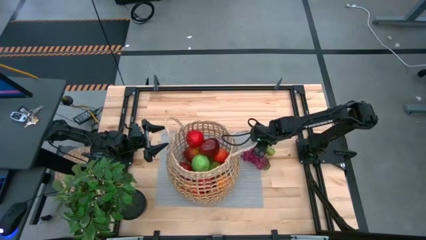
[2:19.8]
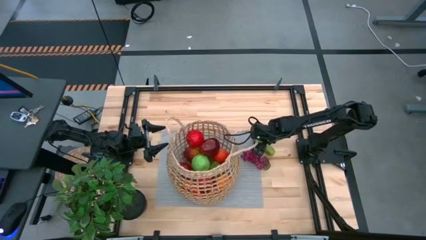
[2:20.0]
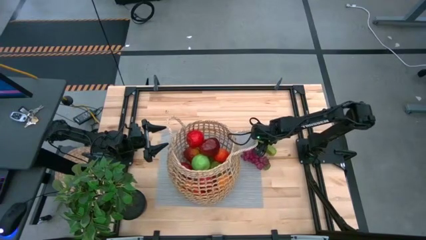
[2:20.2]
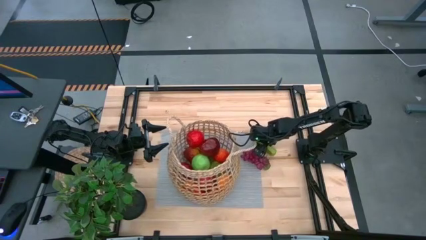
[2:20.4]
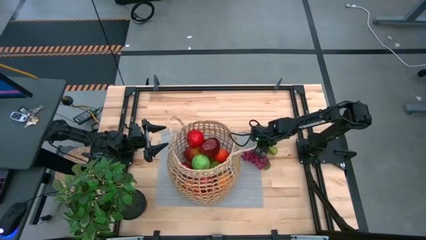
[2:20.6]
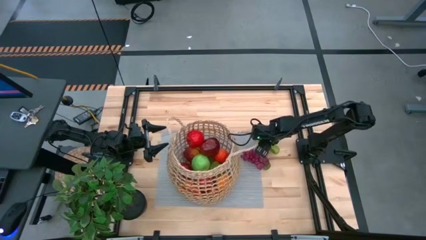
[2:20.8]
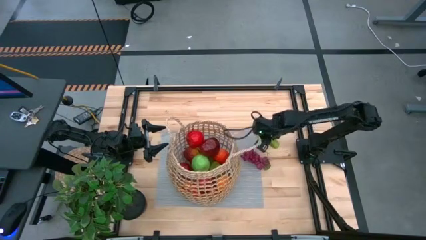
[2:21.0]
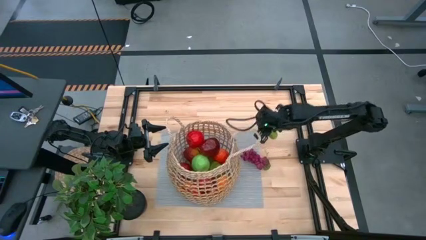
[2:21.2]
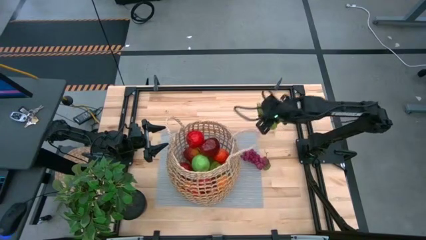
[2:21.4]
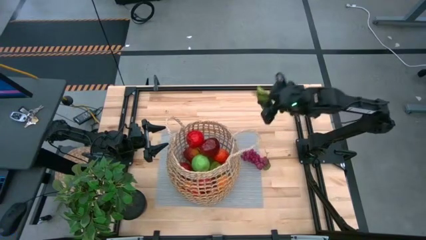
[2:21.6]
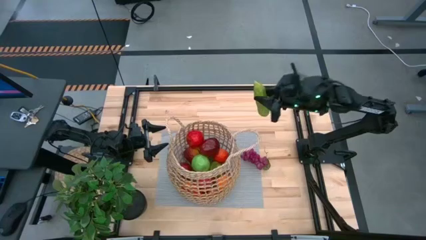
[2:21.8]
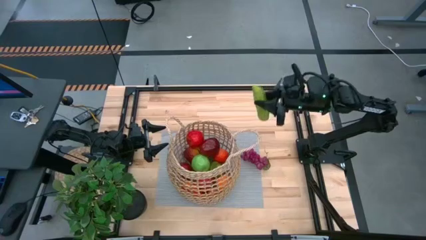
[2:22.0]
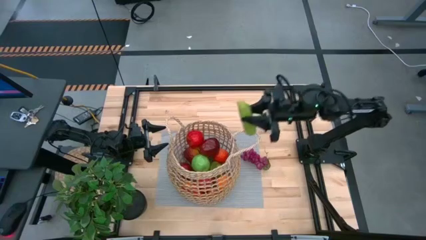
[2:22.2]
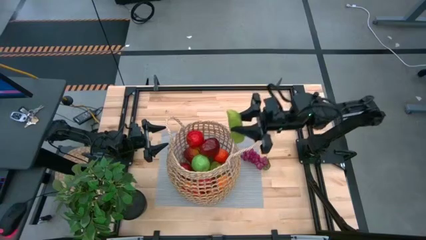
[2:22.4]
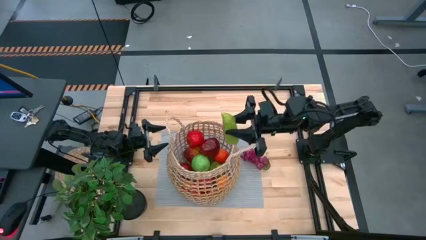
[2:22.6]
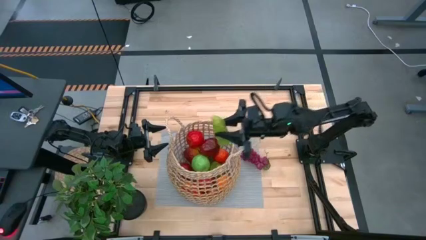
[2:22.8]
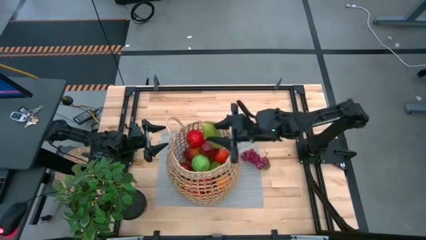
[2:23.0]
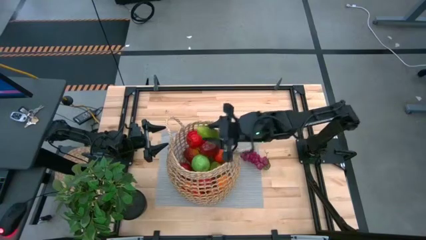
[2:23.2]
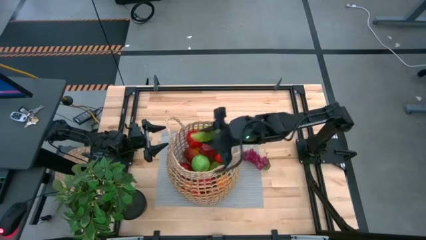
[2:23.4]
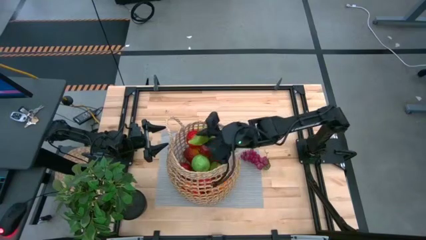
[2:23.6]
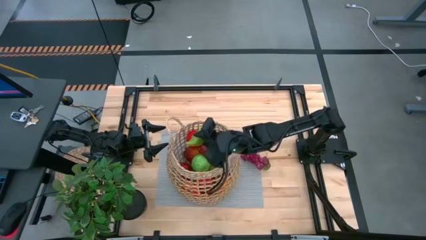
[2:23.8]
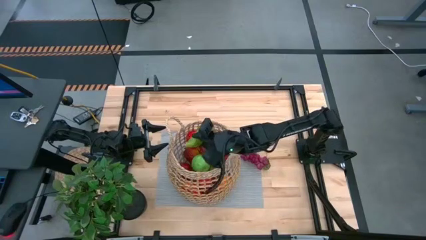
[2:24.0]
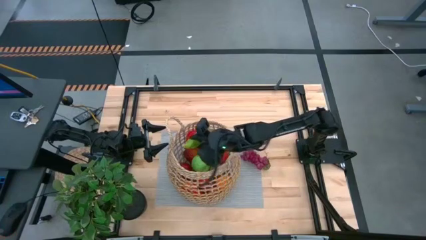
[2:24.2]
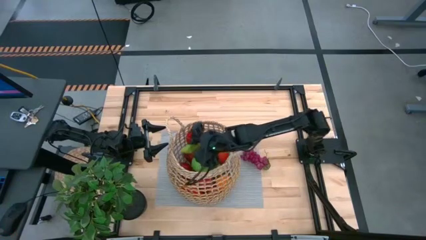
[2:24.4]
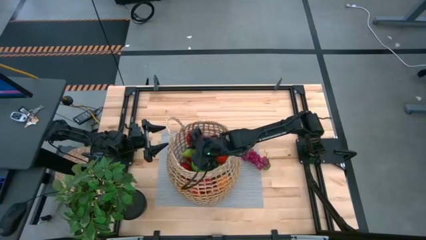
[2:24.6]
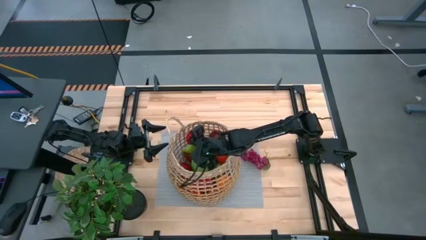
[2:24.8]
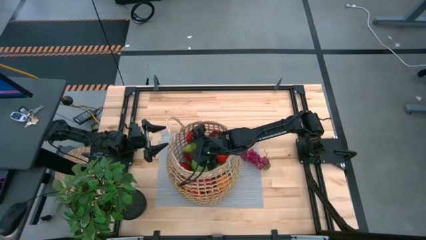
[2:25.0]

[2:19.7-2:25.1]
Task: Build produce basket
Put the green cucumber into the brown basket

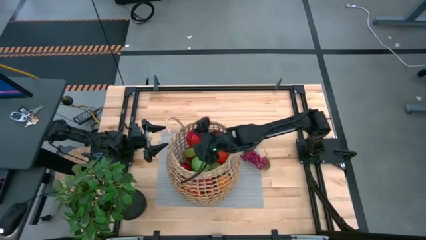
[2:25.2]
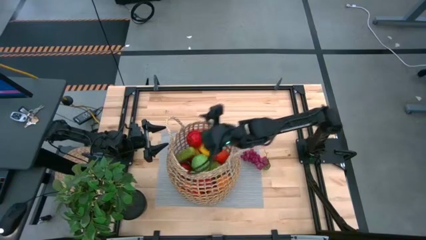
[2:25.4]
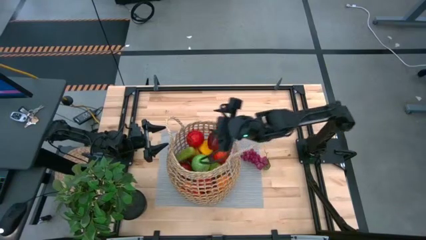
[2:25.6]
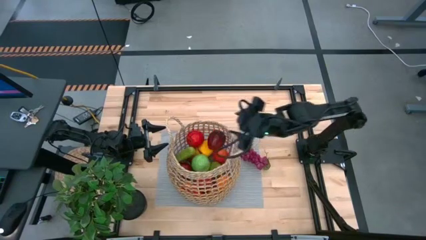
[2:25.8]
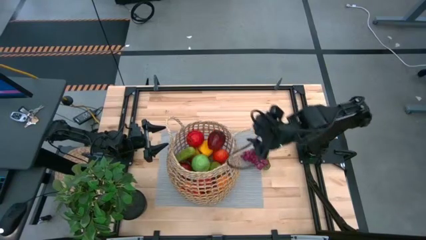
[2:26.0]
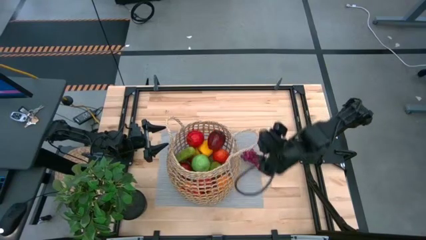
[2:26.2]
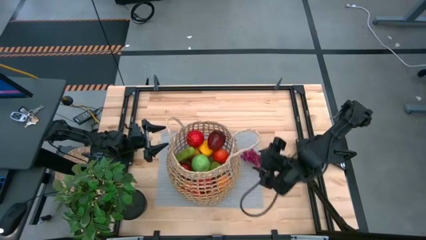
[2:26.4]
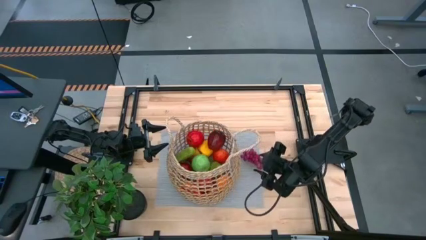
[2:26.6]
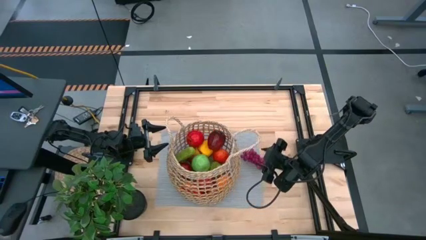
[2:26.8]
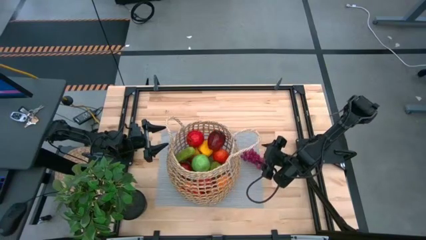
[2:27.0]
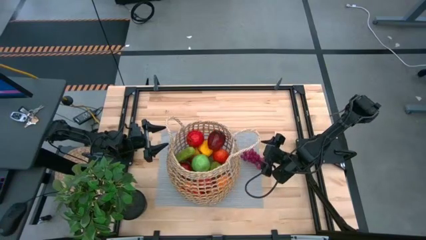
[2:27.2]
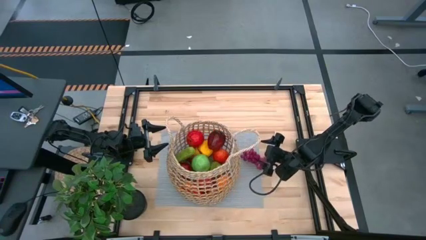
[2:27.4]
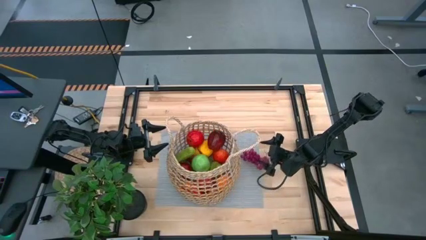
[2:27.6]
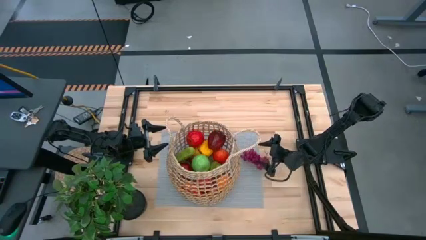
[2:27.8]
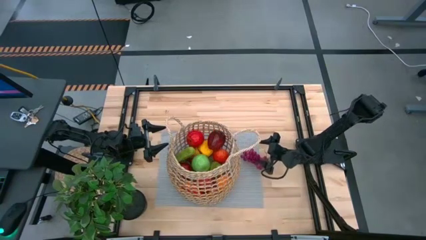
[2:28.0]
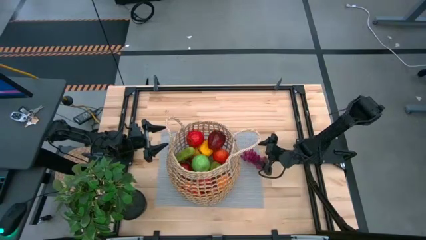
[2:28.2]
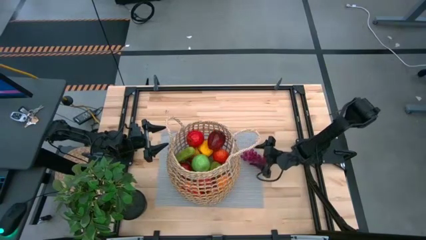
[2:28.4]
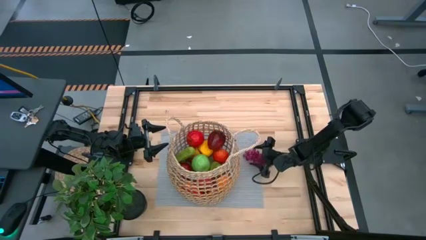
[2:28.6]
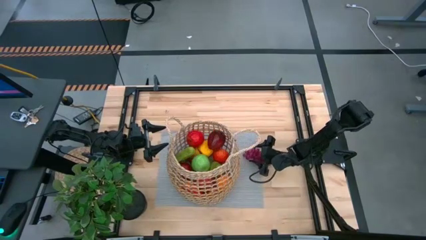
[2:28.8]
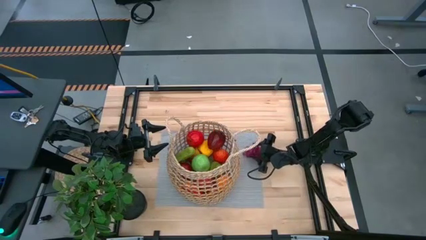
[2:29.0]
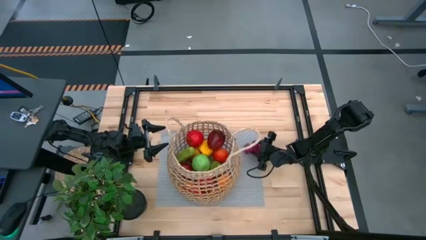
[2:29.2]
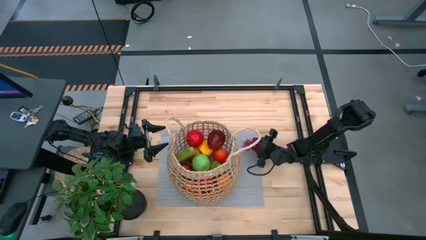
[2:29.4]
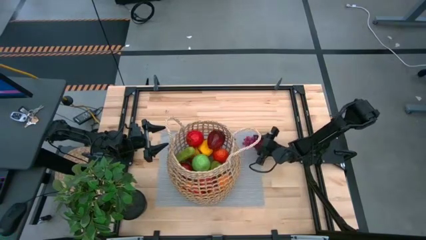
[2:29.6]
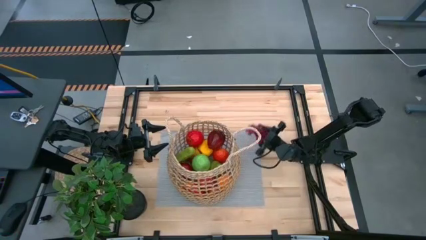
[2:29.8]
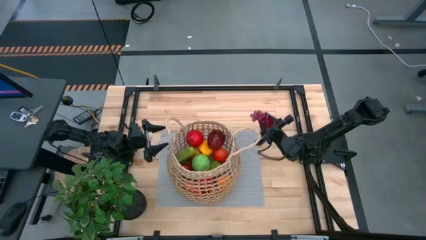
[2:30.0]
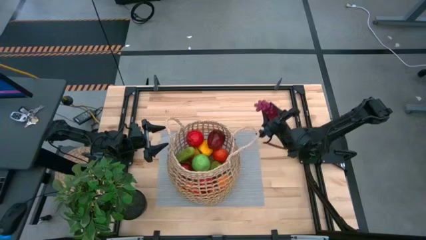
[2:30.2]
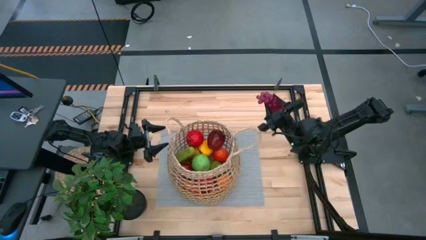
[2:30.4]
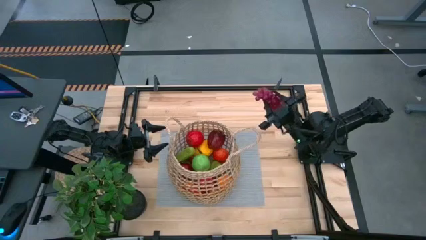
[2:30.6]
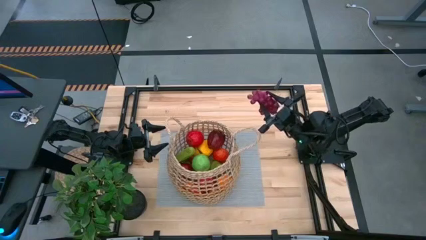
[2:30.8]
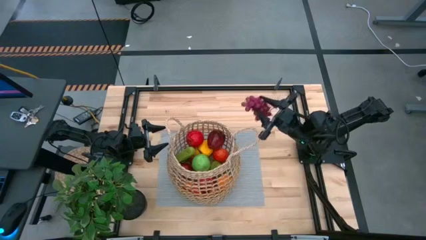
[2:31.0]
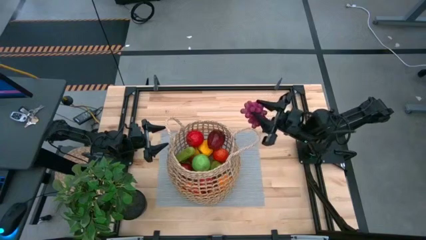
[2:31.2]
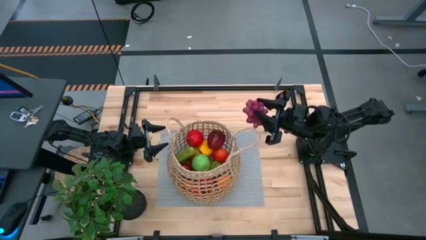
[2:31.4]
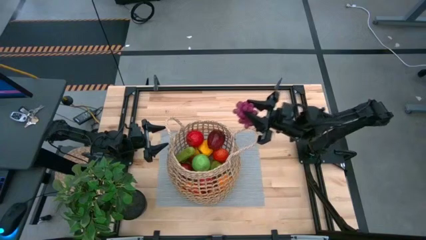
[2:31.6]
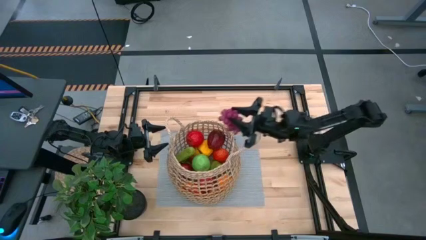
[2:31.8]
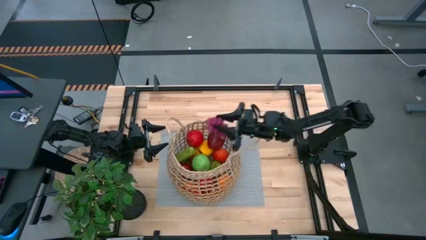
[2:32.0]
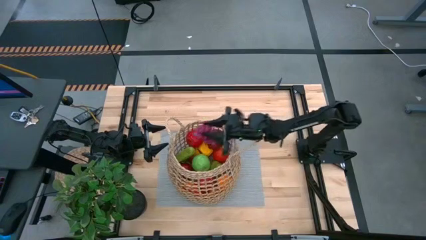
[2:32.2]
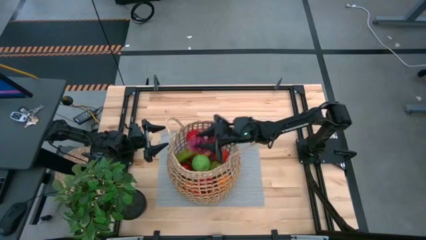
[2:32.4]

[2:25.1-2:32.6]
Put the red grapes into the brown basket

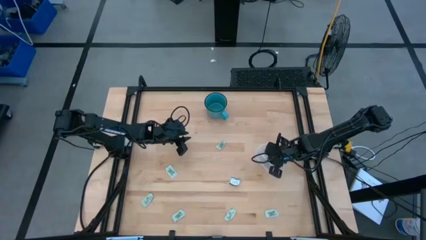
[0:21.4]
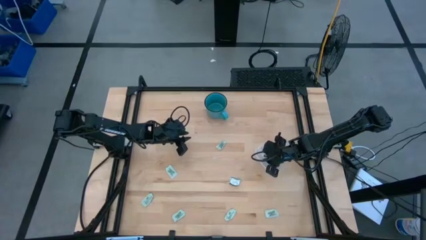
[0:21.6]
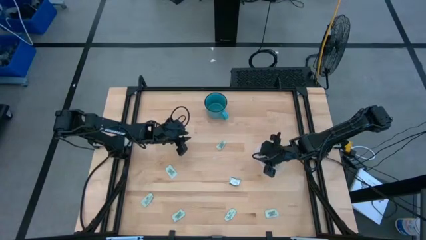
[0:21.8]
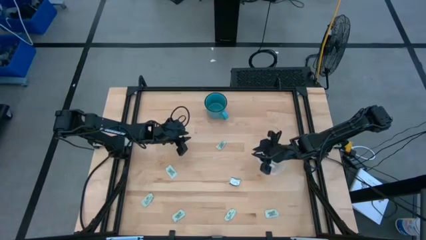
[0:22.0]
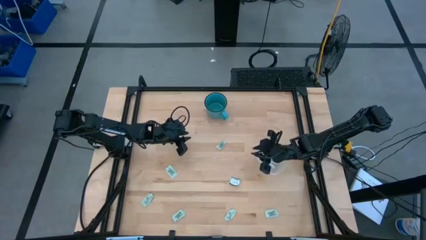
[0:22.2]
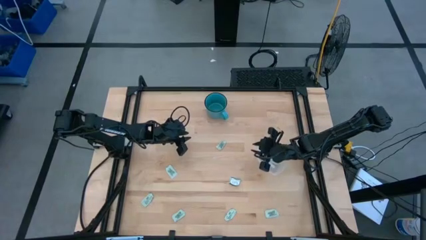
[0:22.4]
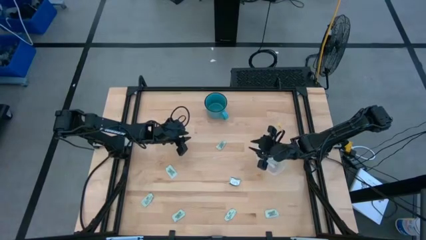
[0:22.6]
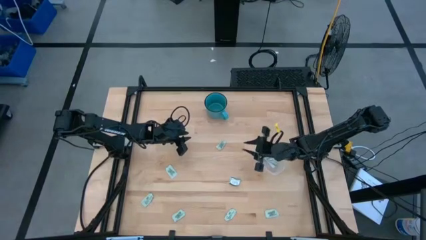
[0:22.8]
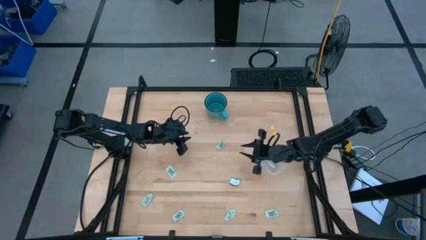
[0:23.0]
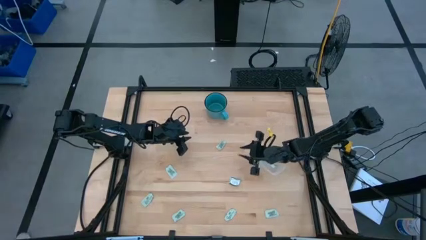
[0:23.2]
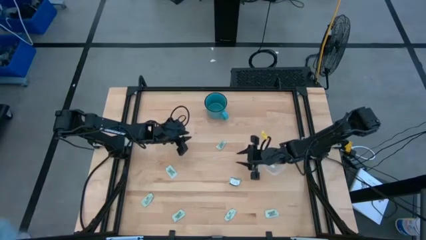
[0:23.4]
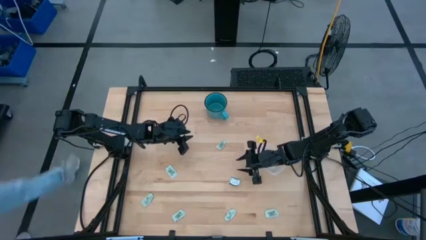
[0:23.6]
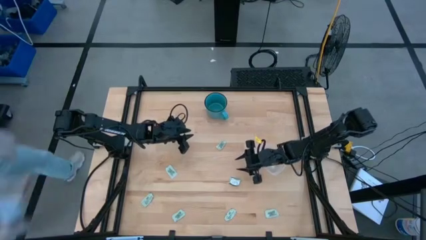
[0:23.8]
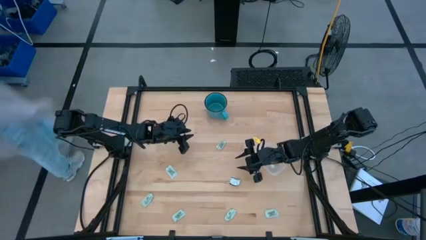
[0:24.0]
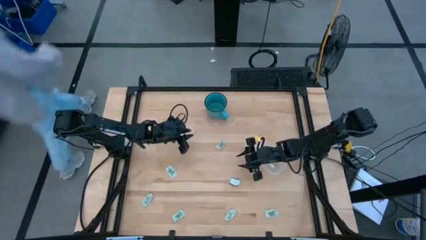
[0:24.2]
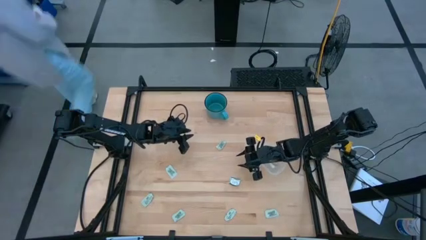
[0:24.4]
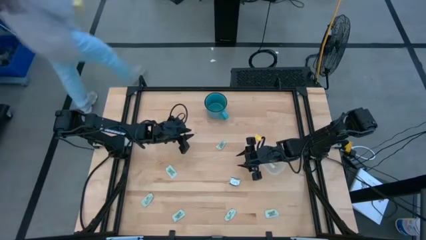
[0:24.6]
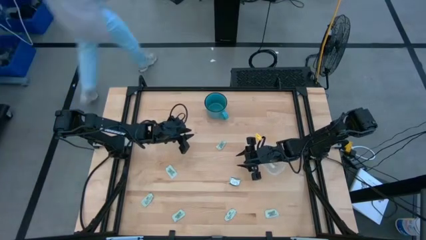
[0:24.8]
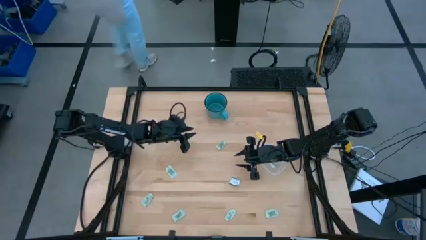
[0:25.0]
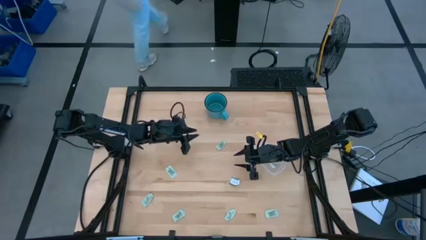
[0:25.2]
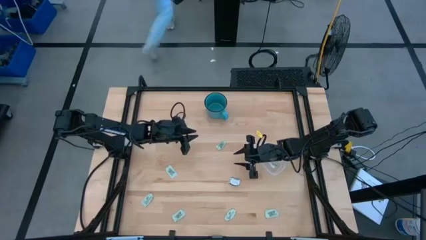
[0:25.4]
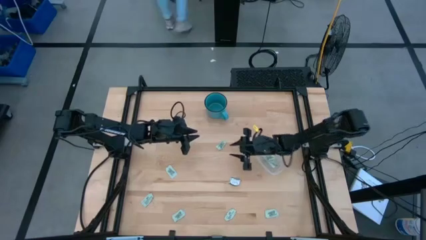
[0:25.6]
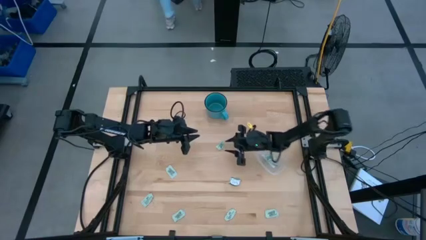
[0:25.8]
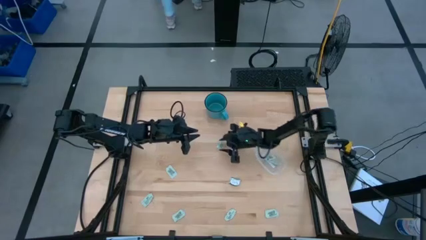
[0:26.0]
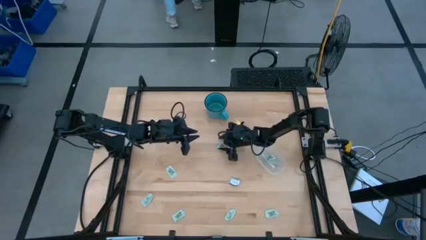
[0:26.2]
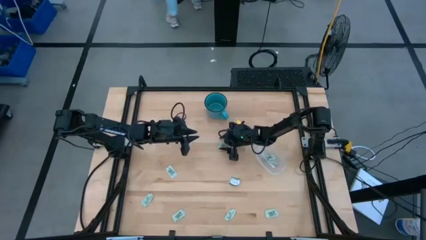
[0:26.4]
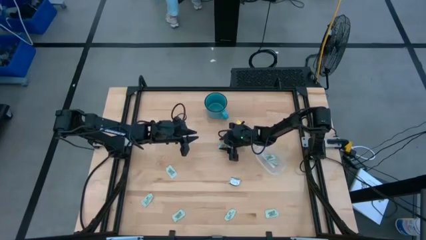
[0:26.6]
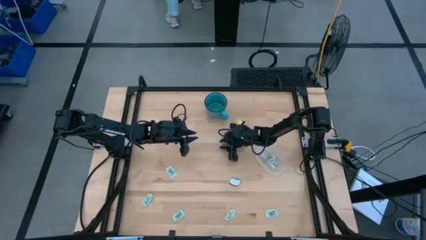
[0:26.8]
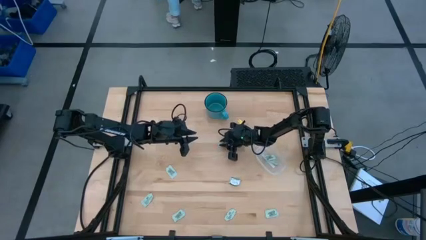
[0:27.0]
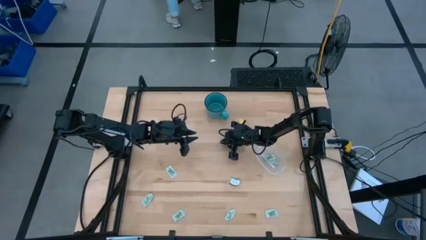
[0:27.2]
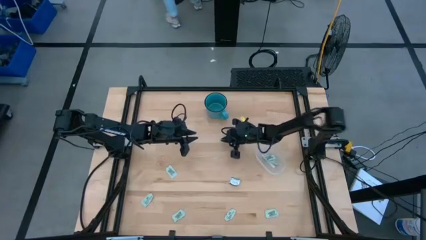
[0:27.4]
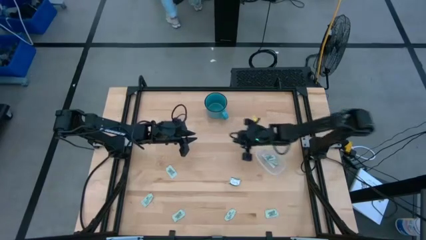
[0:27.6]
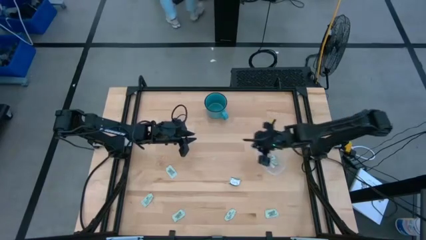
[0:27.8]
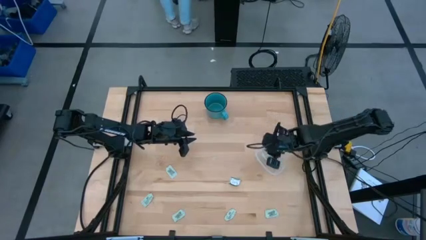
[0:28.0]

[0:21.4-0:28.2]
Task: Pick and place Stevia / Truvia into bins
Put the white stevia packet into the transparent container
